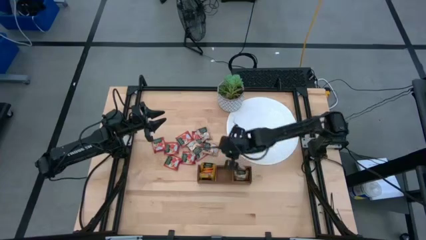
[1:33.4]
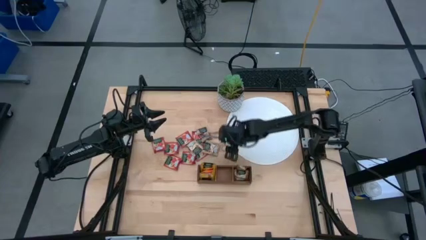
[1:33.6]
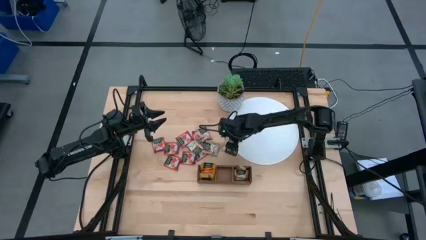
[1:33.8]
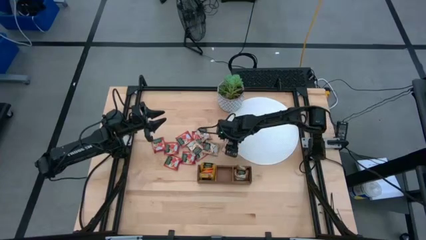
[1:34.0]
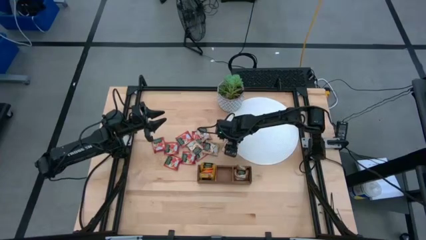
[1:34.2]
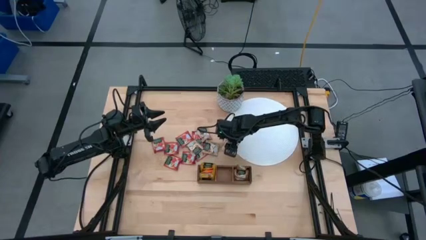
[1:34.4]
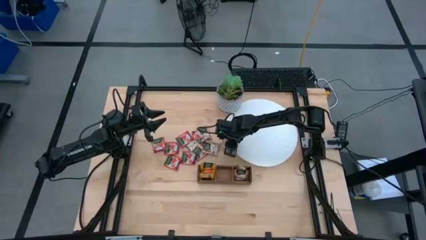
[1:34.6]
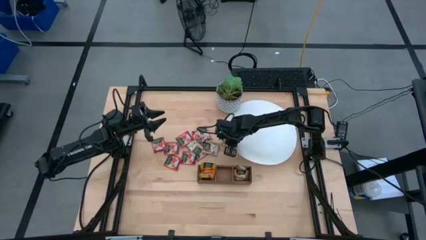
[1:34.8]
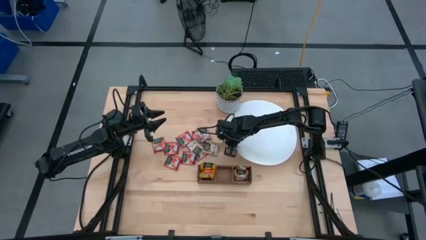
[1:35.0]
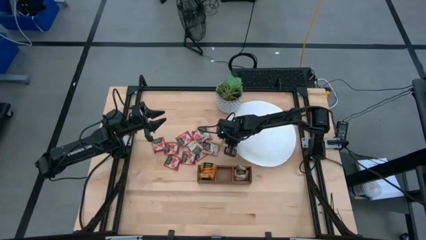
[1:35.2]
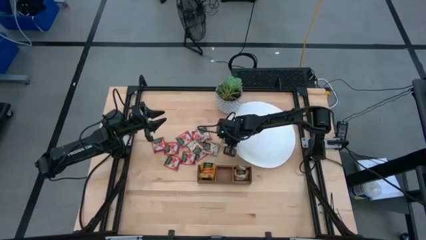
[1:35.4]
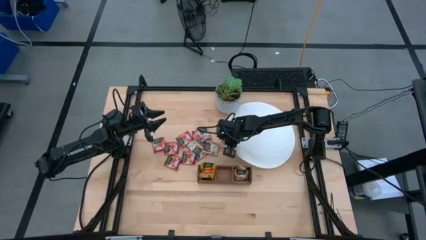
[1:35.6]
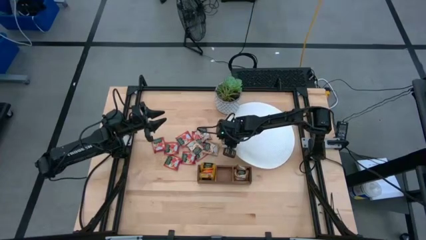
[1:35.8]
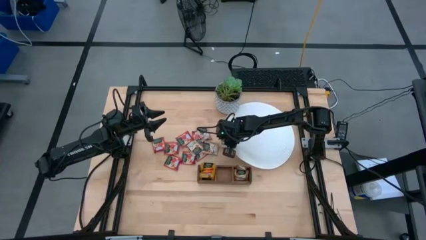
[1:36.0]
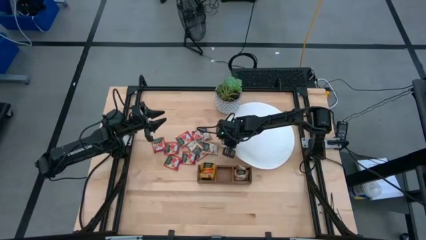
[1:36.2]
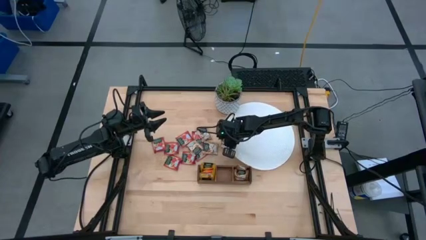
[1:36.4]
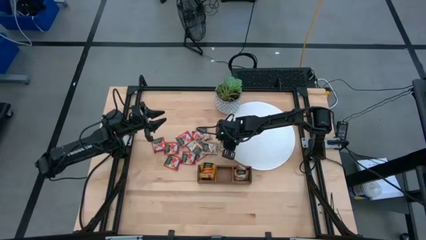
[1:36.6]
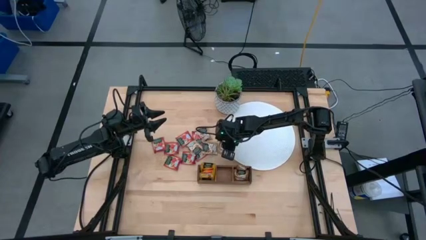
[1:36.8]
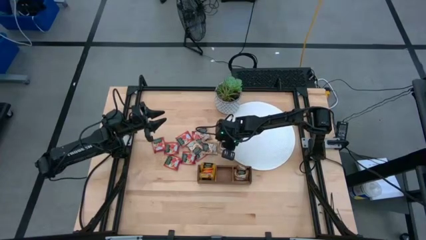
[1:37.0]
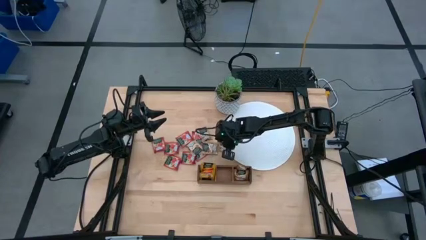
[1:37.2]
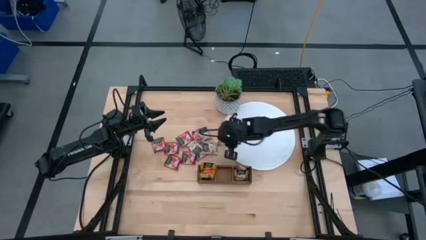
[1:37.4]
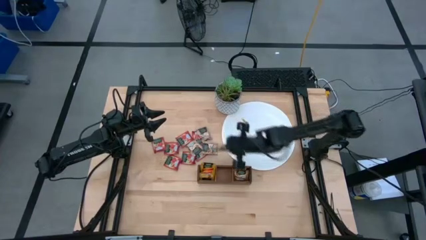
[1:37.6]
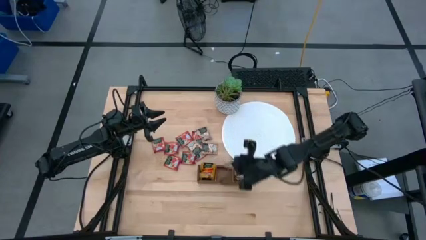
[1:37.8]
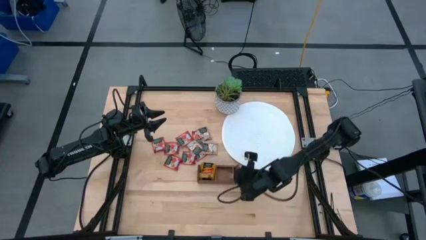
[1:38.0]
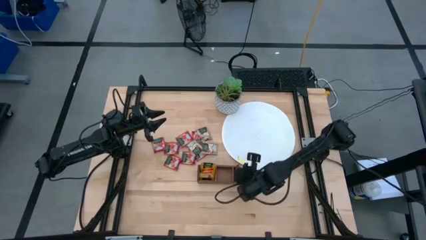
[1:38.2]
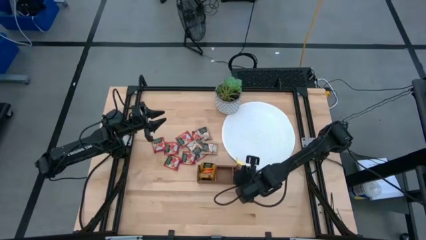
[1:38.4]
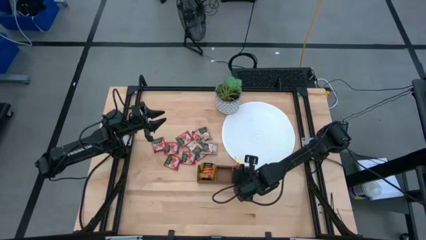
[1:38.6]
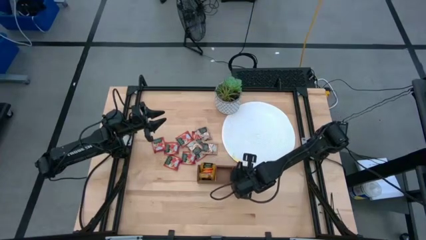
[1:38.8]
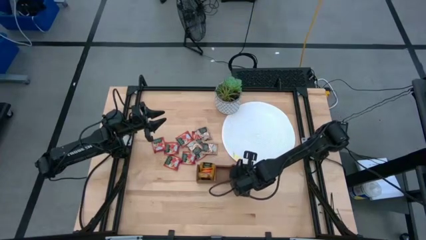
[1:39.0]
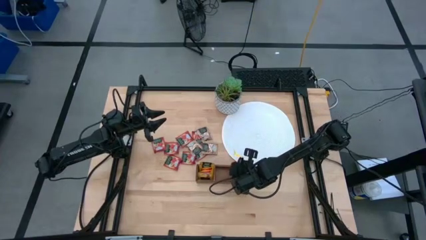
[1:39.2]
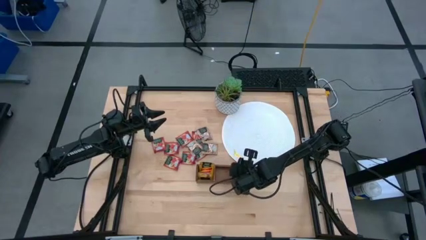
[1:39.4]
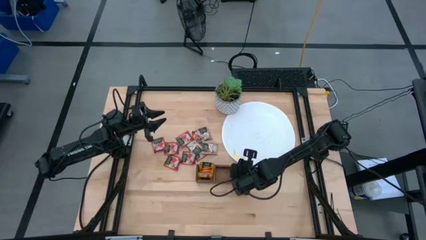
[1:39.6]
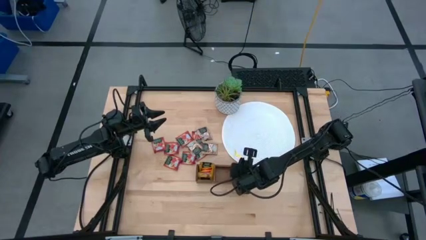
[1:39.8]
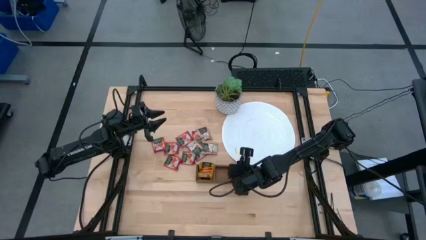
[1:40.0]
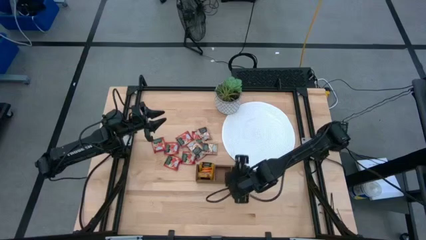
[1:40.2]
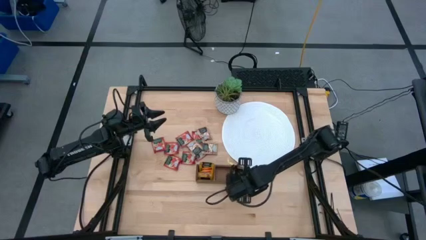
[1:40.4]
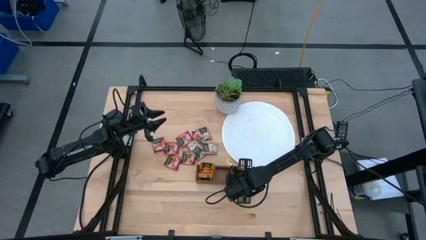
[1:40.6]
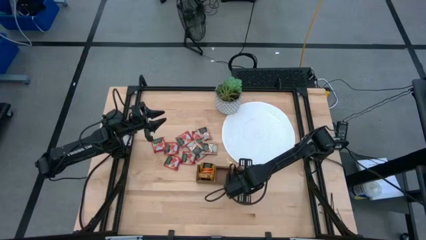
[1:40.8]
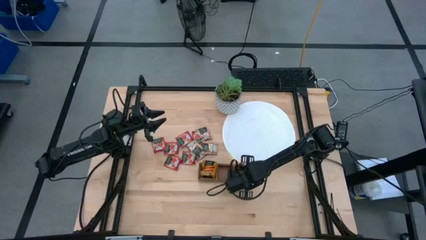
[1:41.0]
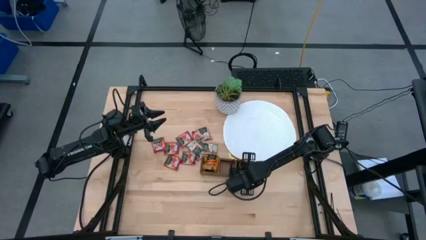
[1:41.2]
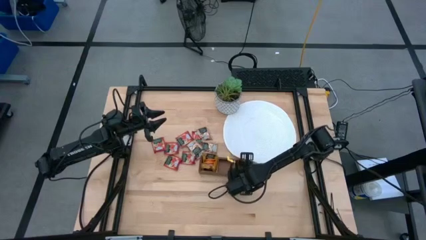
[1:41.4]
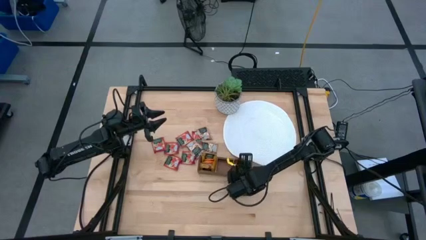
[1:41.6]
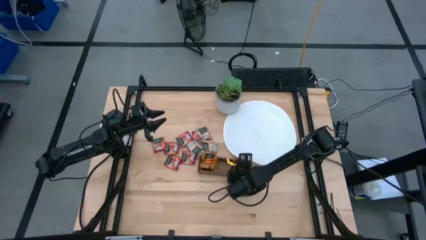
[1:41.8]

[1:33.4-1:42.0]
Task: Pick & Place Tea
Put the light brown tea bag into the right section of the wooden organizer

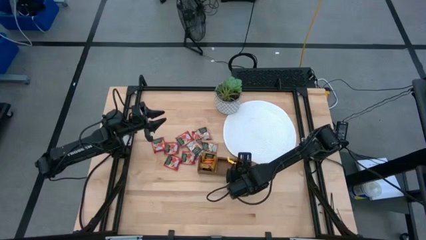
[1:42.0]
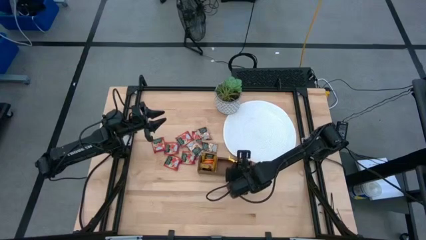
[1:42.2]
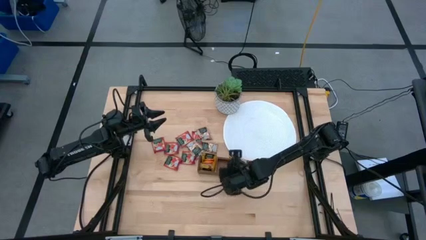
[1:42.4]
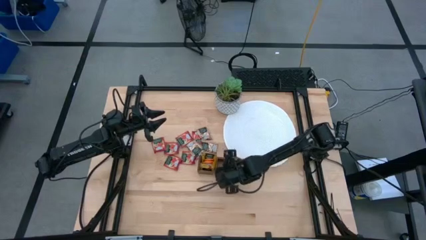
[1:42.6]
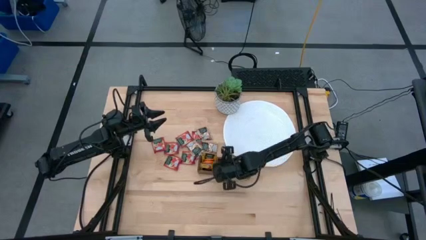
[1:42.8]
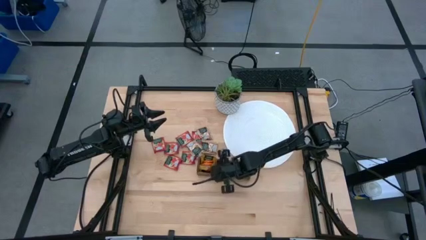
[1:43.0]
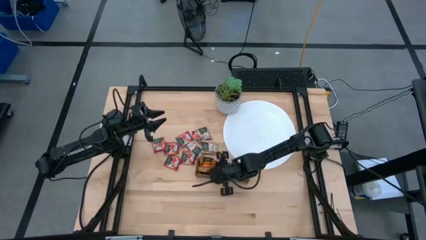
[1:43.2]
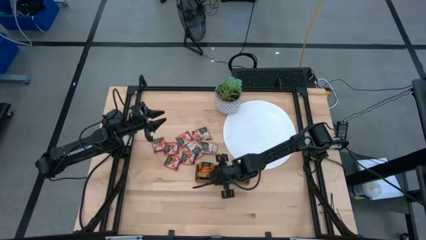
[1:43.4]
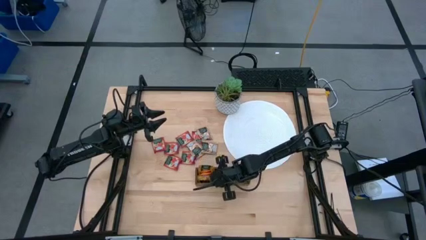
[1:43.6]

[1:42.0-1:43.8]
Adjust the wooden organizer

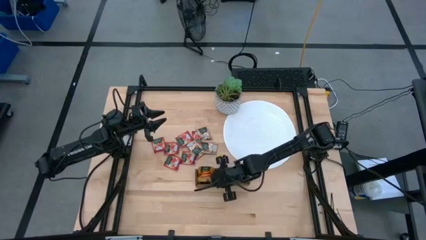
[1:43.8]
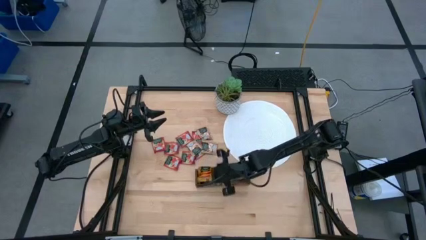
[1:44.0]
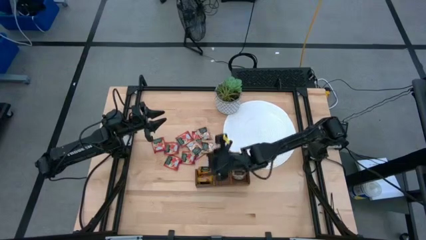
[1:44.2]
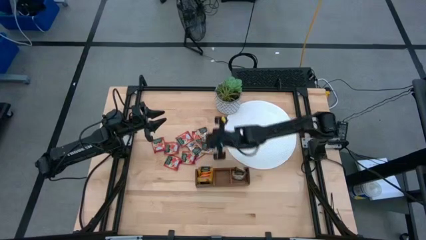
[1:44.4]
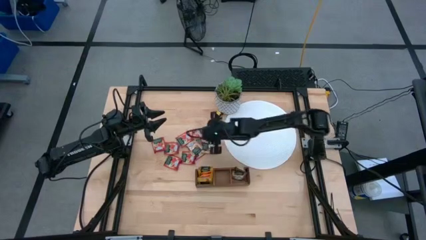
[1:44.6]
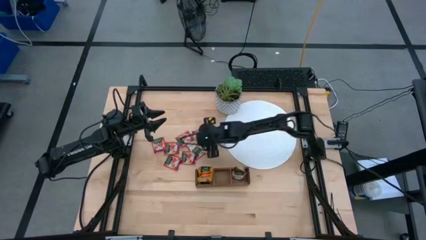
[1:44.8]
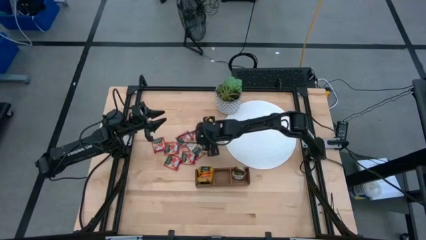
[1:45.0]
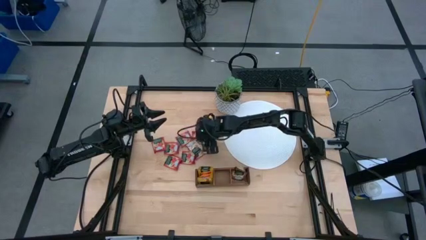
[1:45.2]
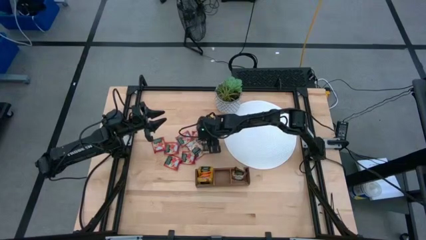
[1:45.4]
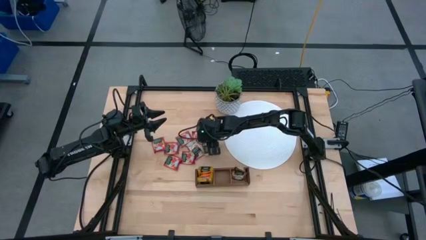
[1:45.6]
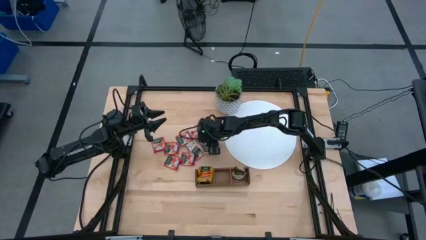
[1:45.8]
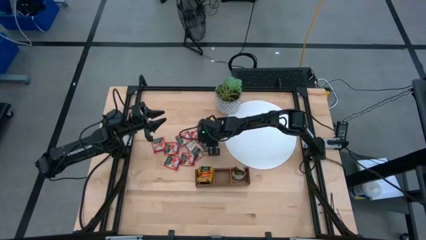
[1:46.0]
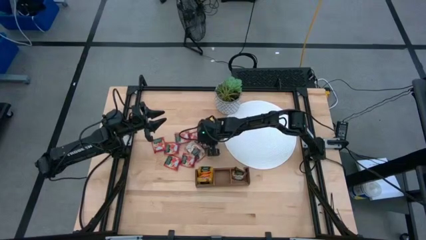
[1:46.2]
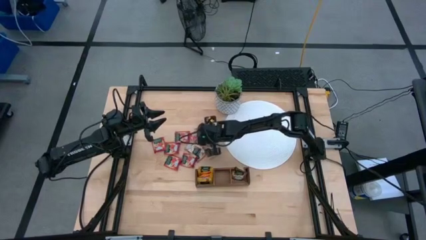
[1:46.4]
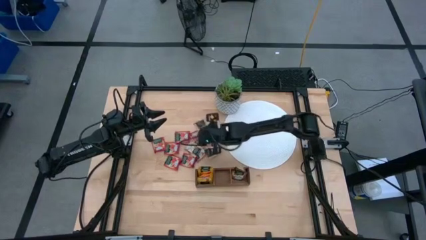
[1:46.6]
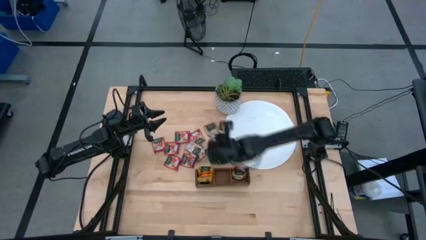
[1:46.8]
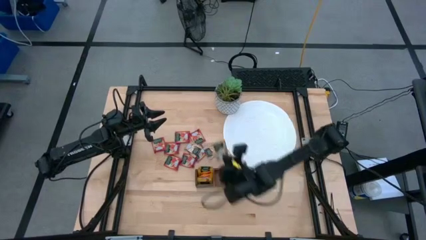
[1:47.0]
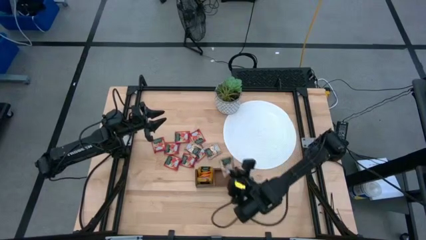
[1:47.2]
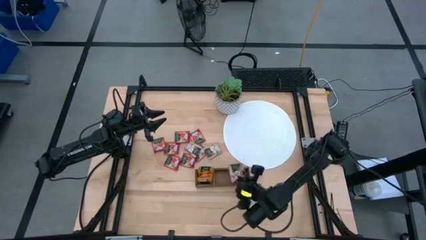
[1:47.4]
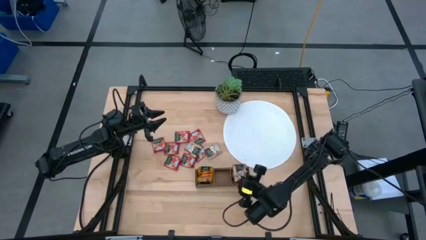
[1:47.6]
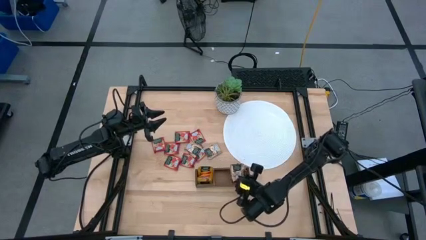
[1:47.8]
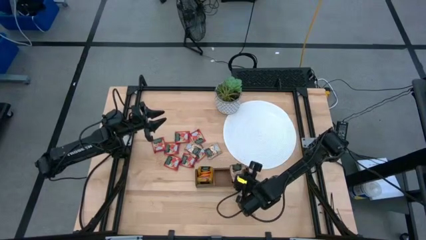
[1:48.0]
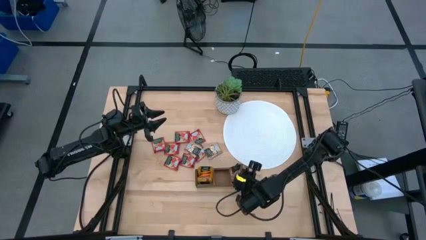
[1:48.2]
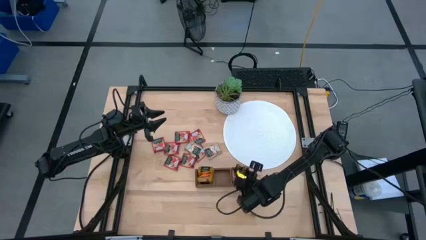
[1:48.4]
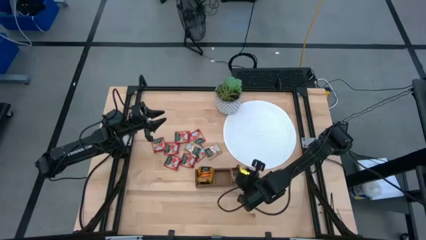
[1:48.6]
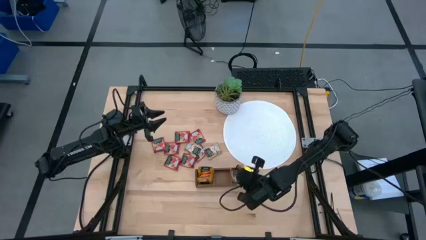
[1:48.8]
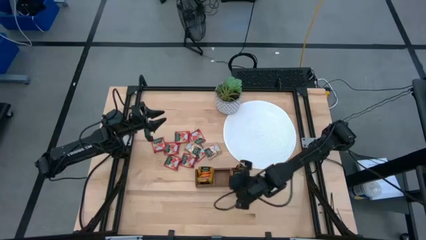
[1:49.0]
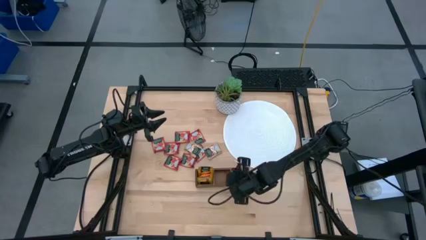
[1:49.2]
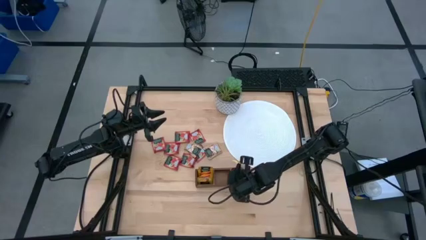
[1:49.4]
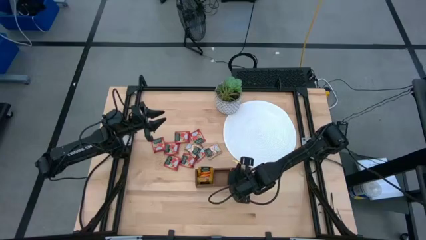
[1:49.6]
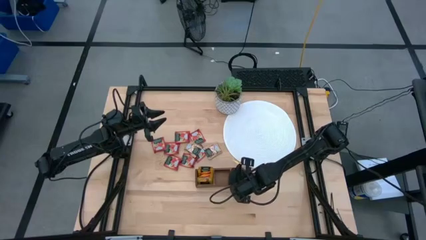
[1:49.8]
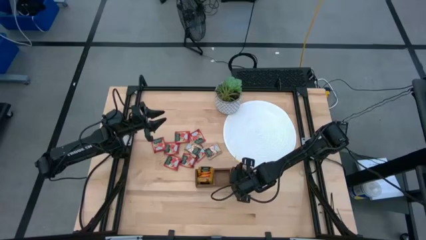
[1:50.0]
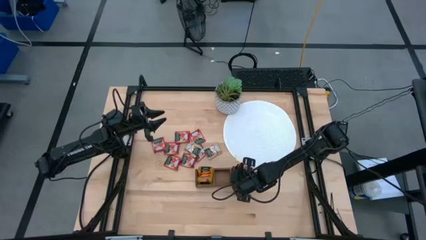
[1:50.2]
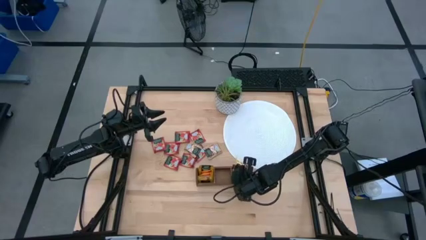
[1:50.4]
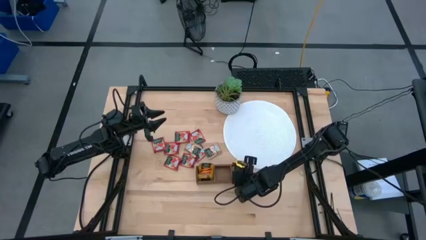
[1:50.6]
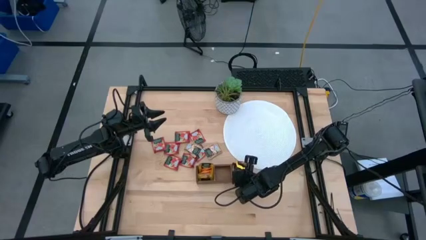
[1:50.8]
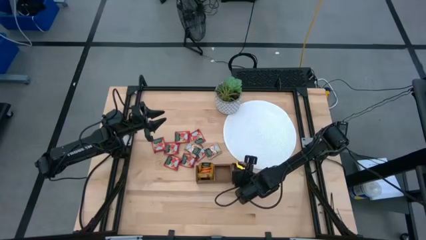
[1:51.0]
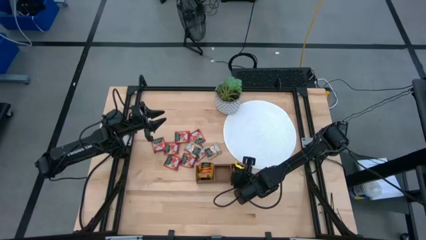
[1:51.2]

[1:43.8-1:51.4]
Put the light brown tea bag into the right section of the wooden organizer
